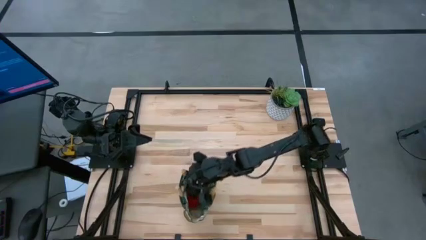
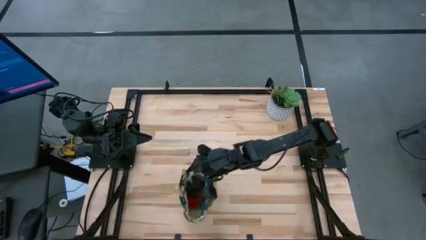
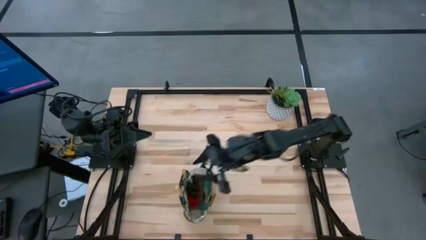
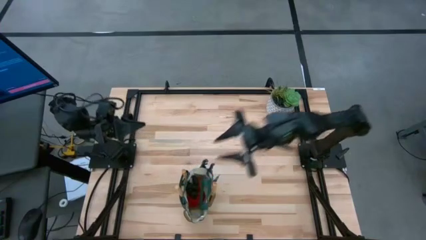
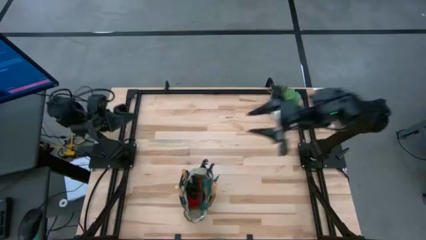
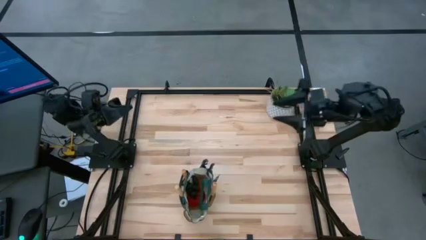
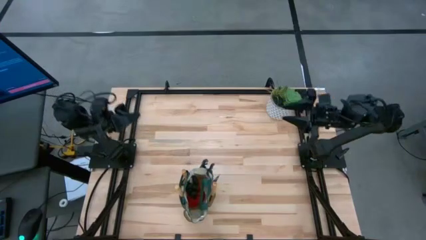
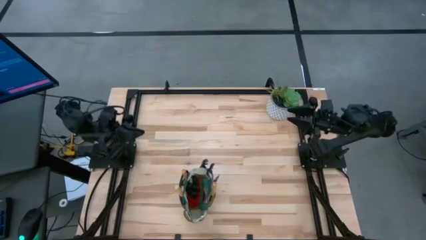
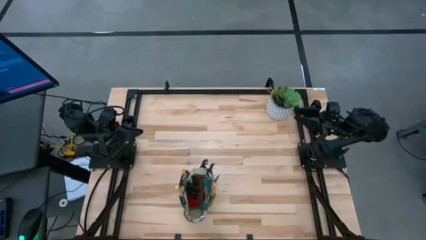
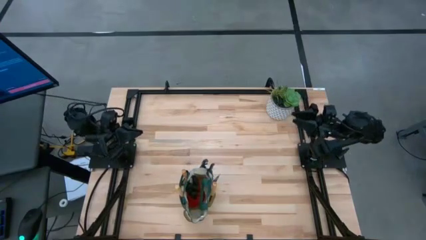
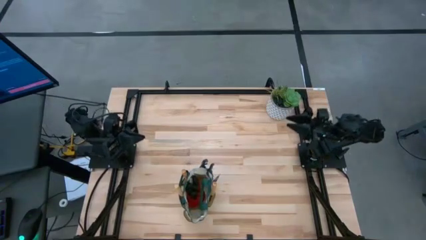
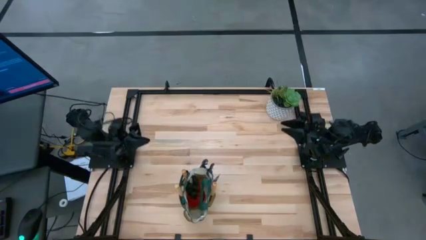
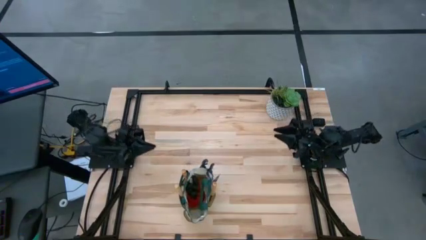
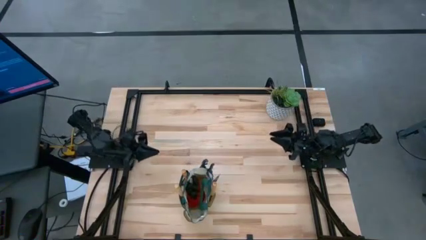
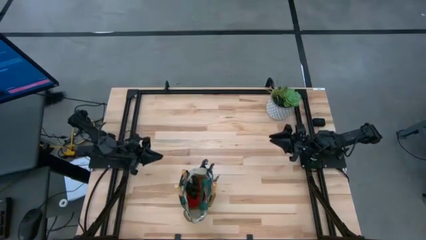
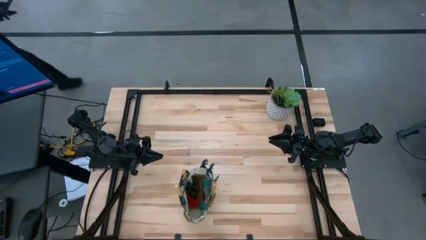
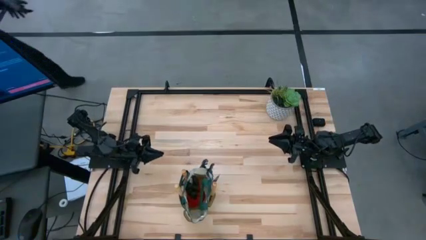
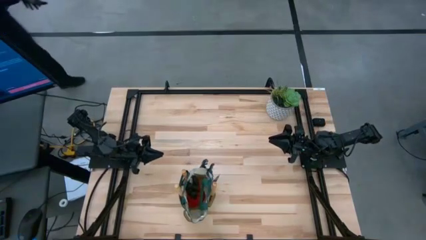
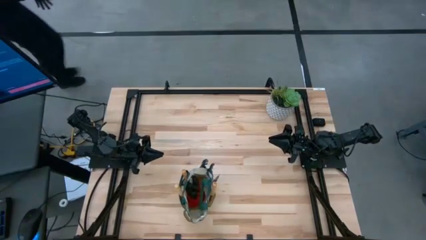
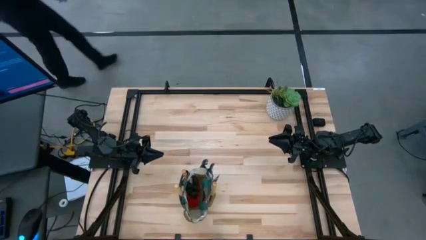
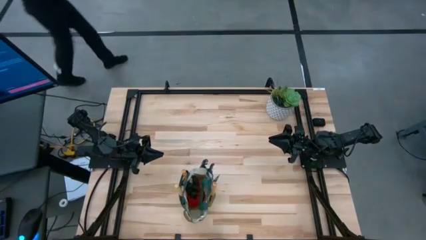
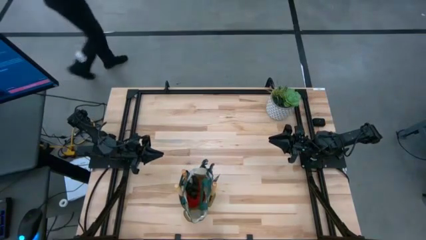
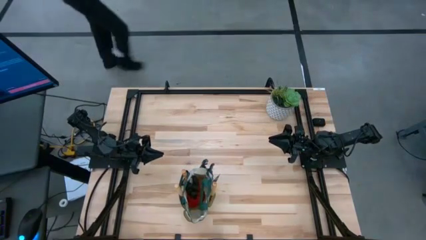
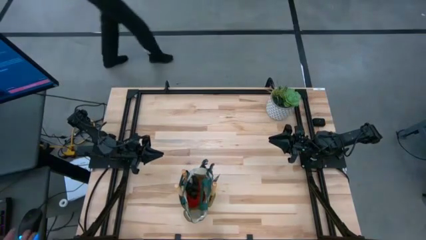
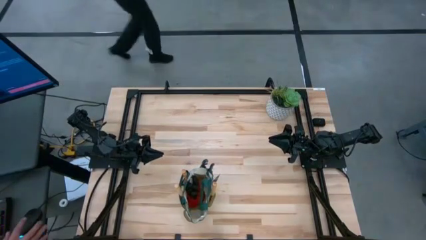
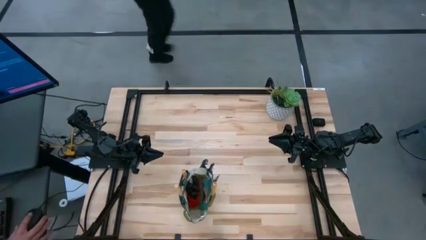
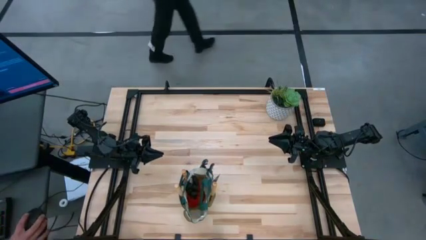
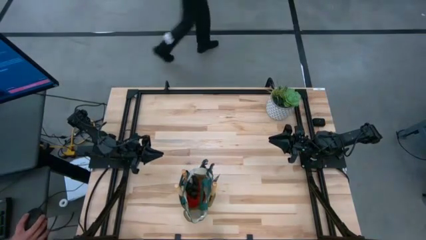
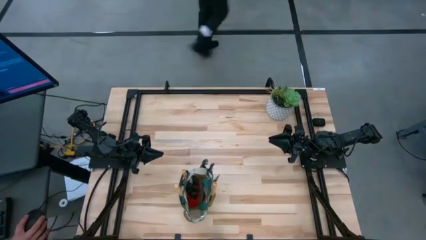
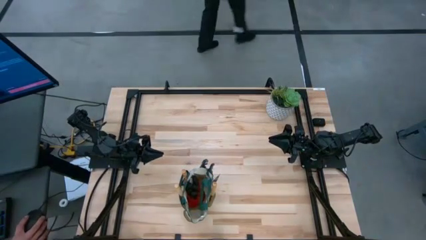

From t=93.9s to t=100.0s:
Task: Pick & Place Garden tools in Gardening bag
Return to Home Position

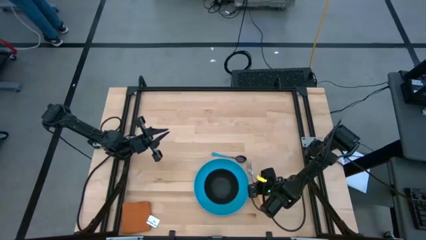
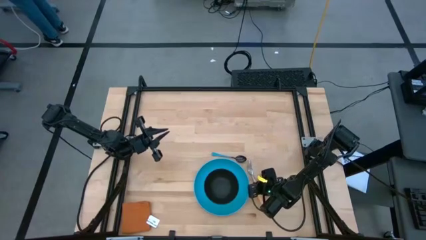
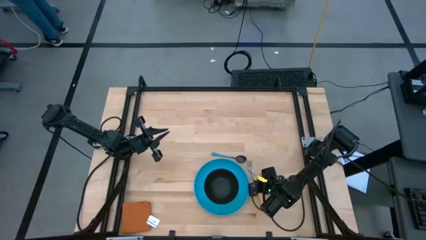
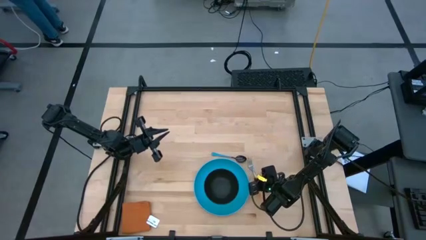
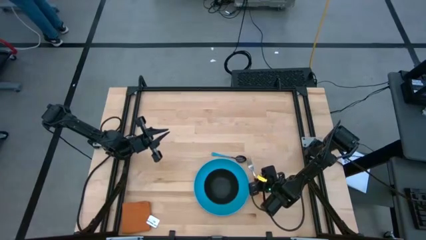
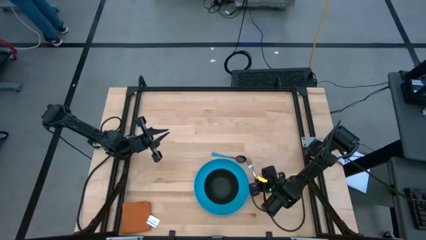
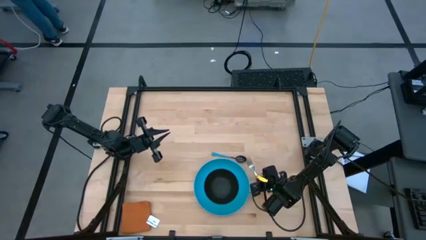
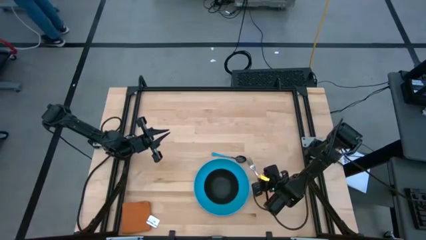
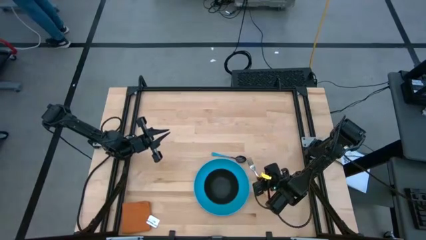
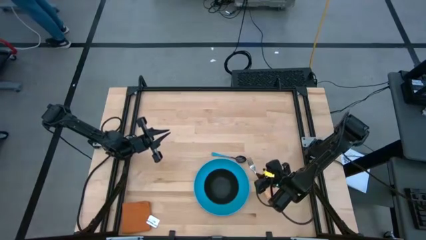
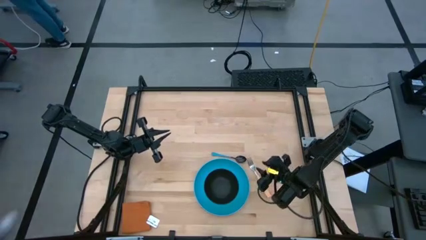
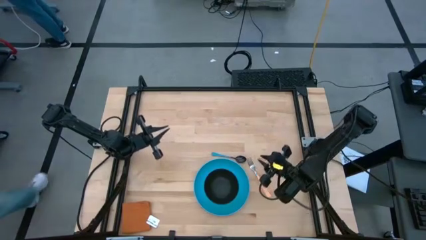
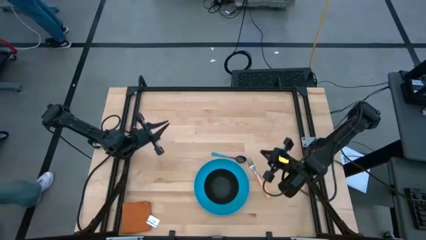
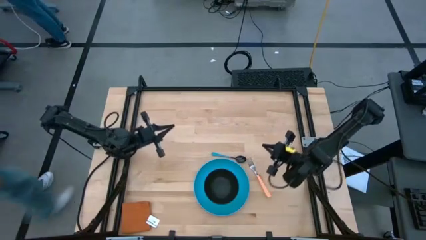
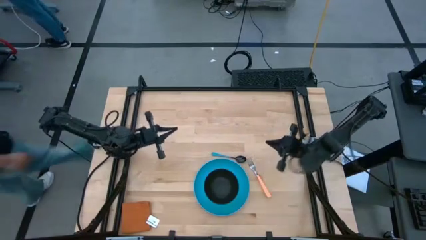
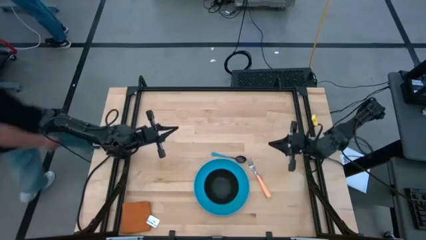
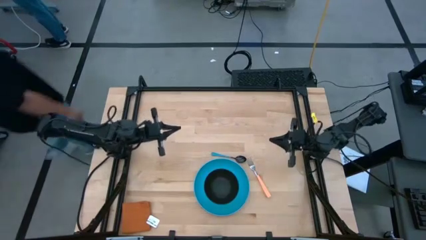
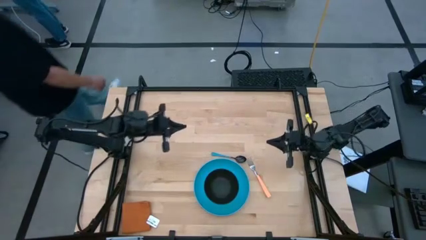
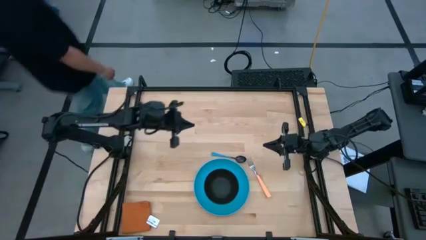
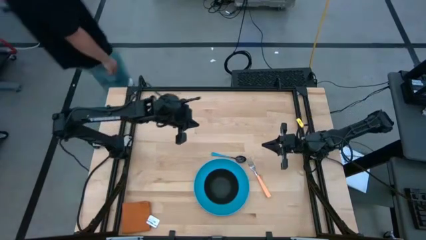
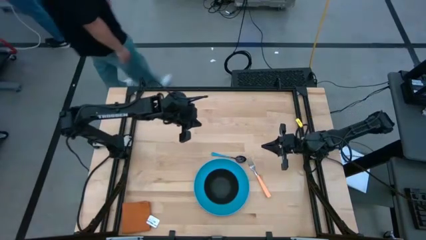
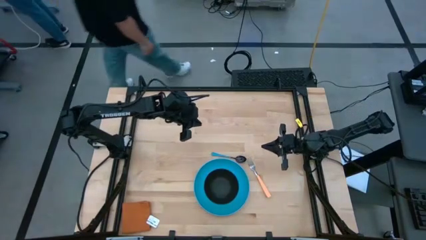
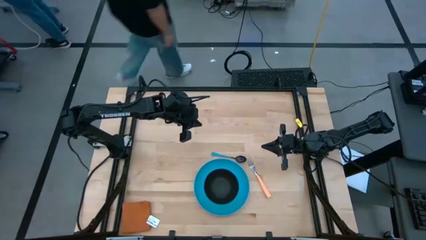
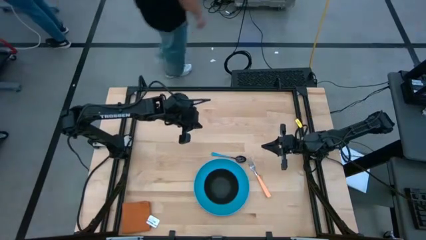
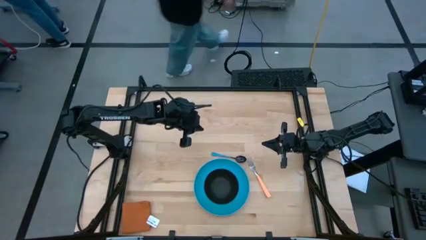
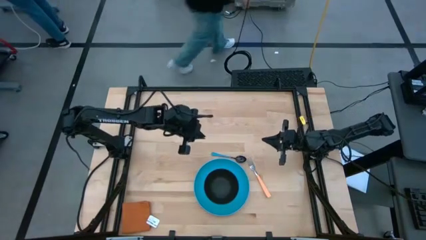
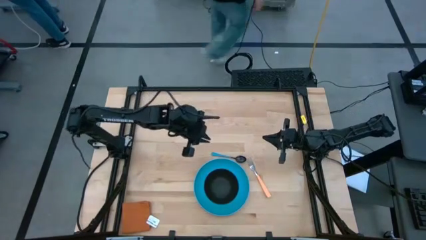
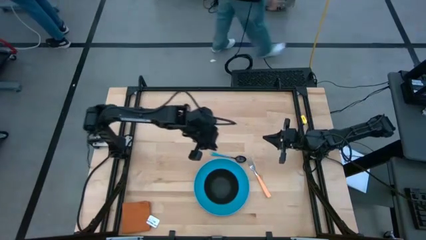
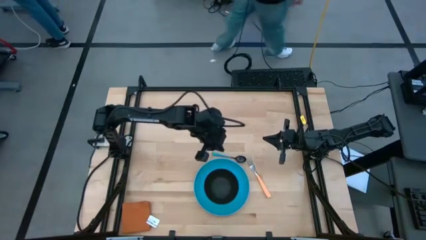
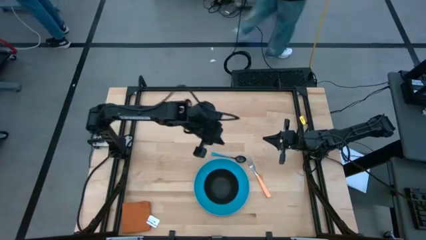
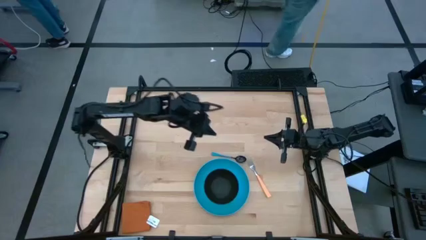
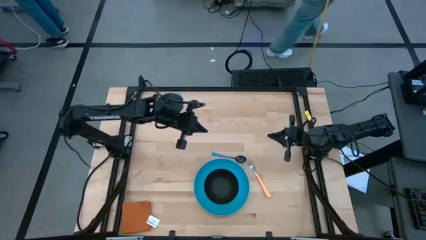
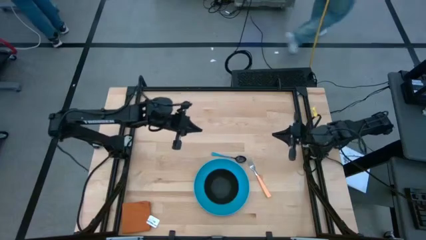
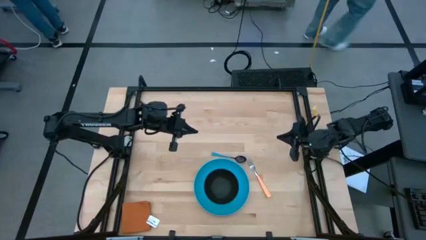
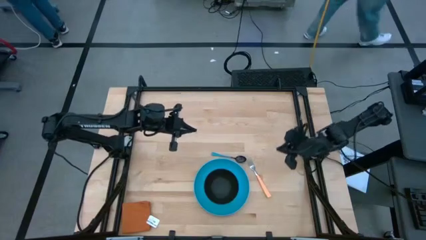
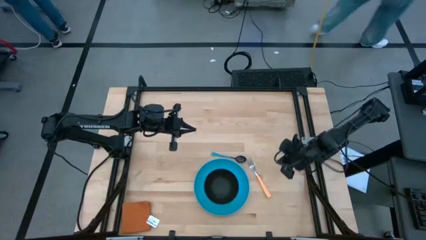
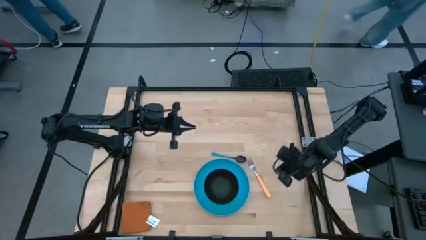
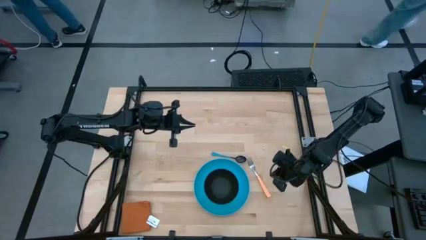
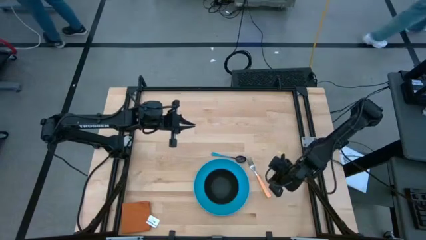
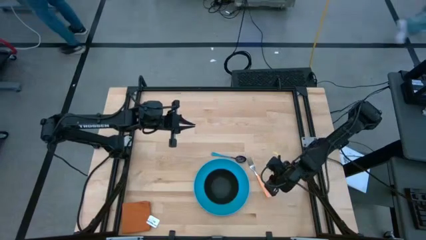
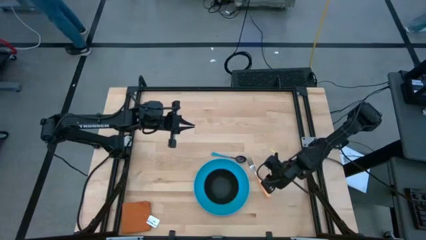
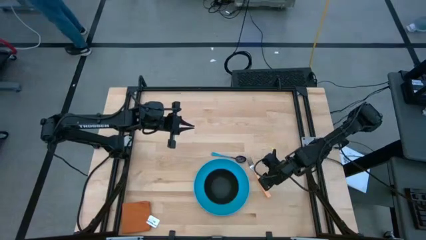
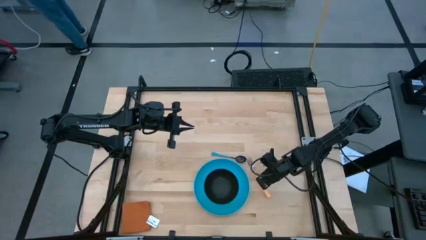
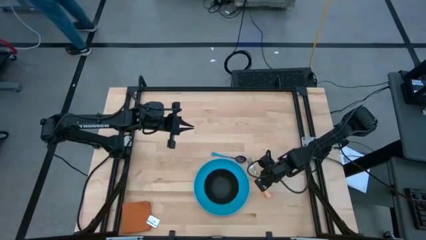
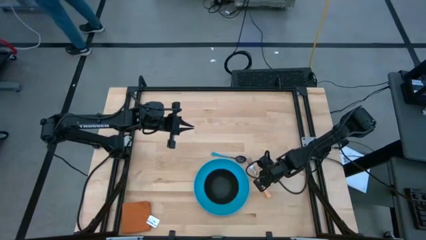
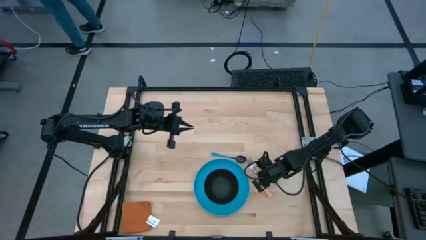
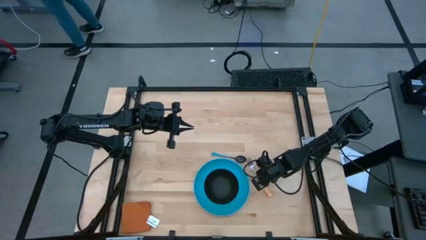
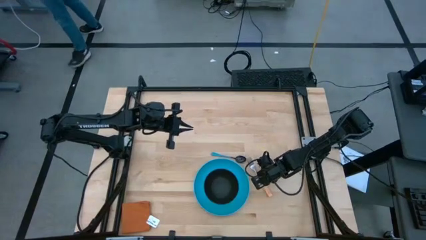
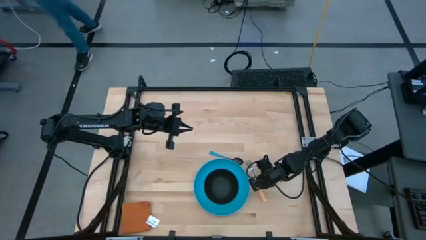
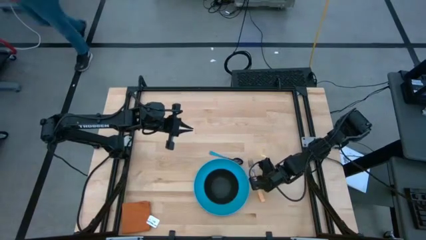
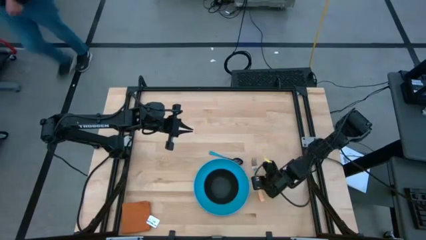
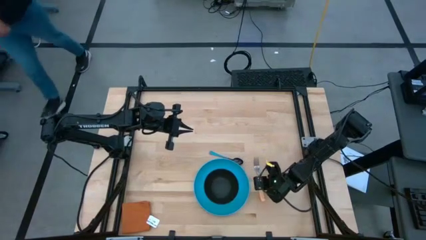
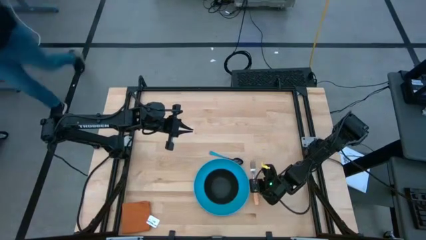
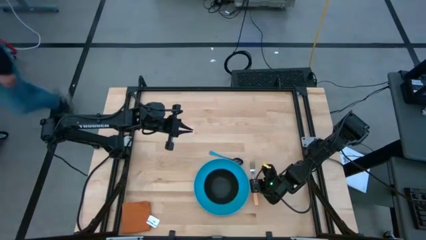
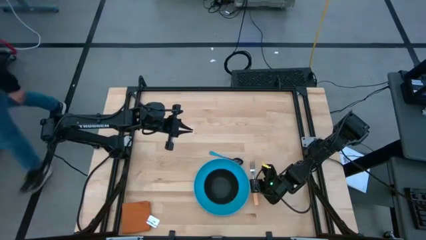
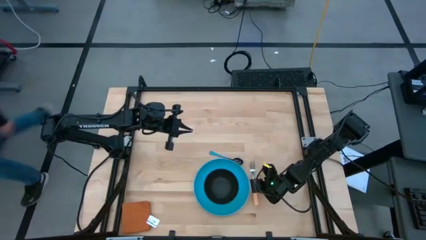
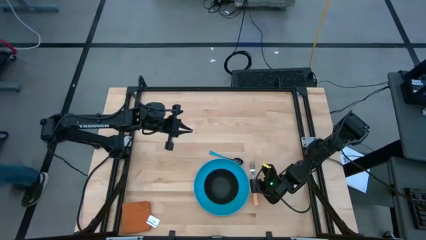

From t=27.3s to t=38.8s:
Task: Set table place
Put the pink fork on the right side of the plate on the table
